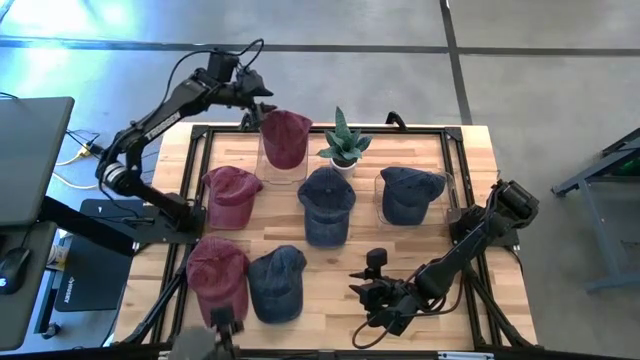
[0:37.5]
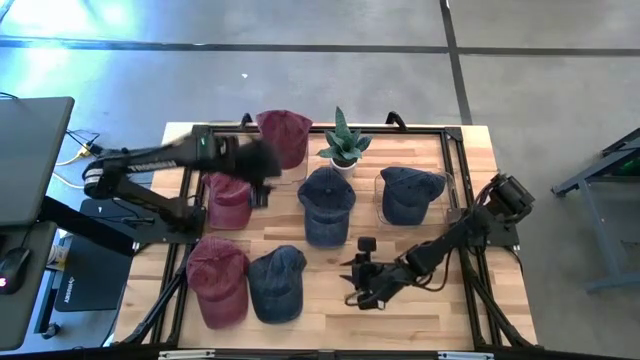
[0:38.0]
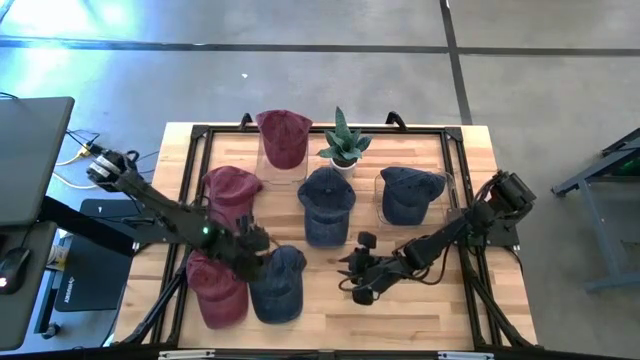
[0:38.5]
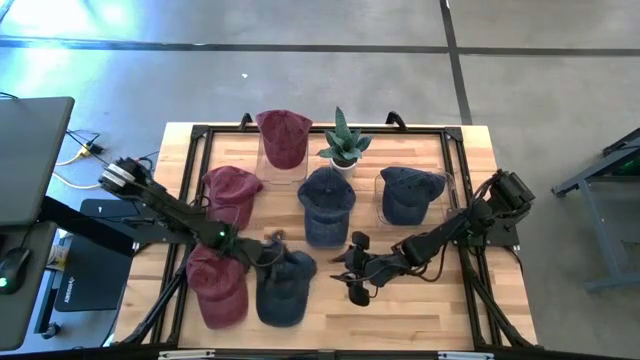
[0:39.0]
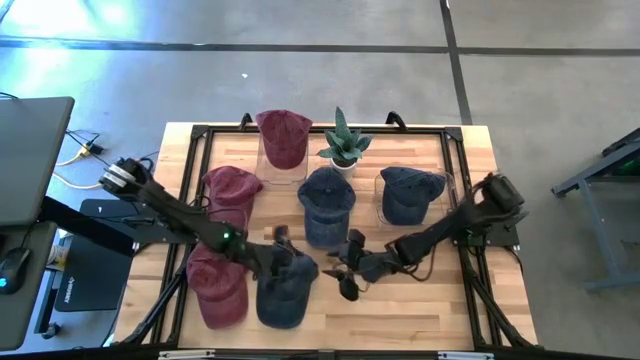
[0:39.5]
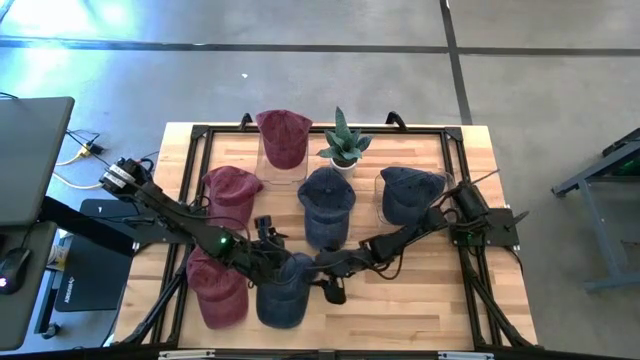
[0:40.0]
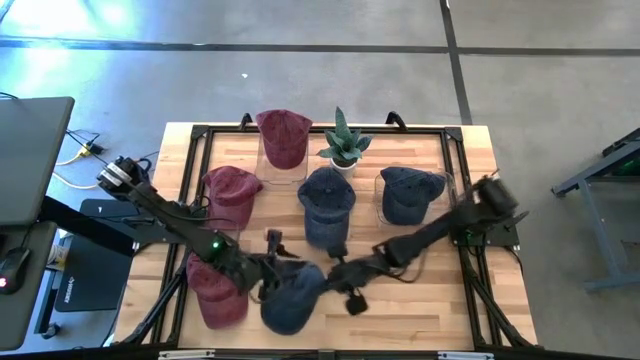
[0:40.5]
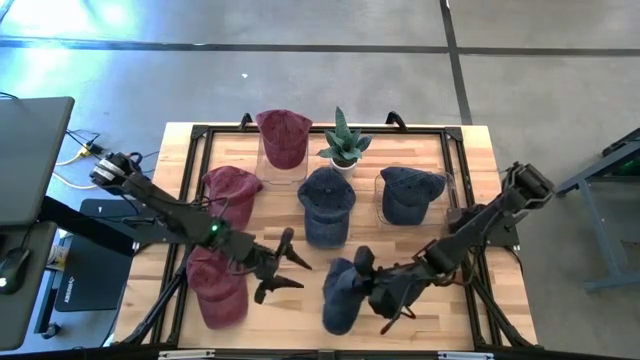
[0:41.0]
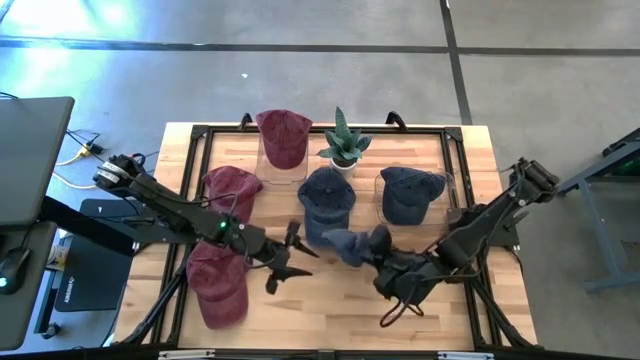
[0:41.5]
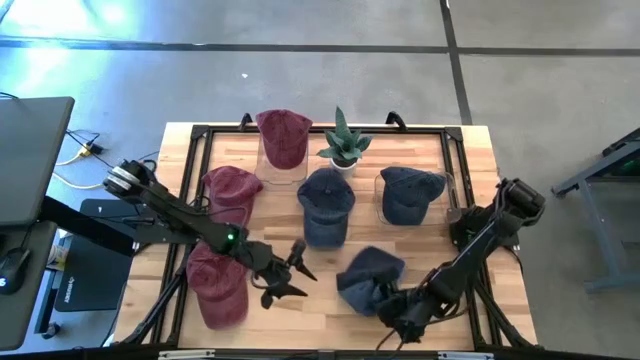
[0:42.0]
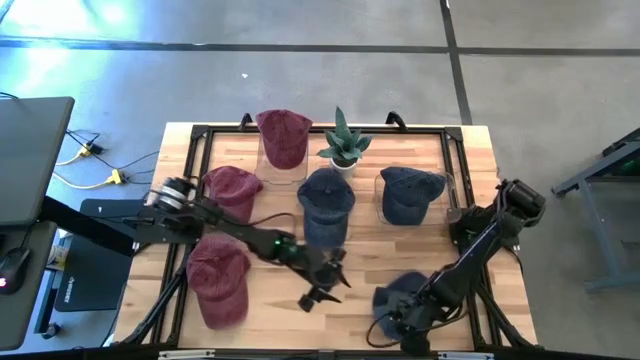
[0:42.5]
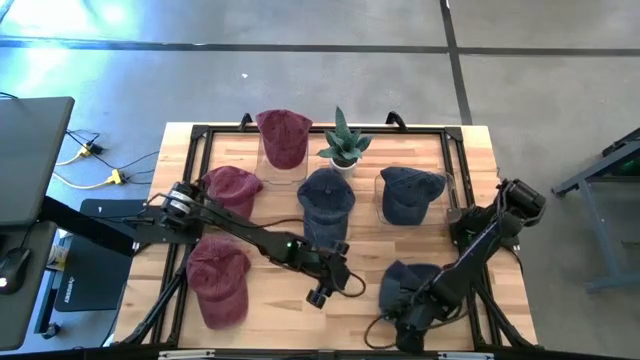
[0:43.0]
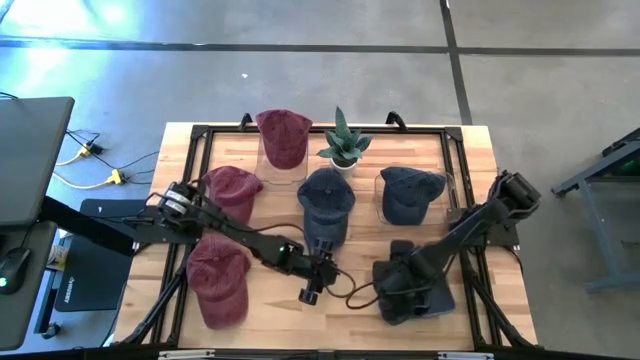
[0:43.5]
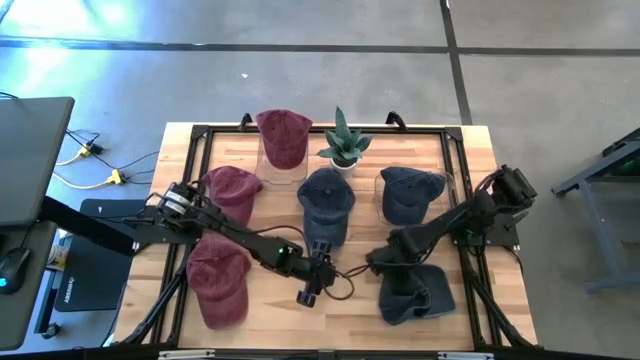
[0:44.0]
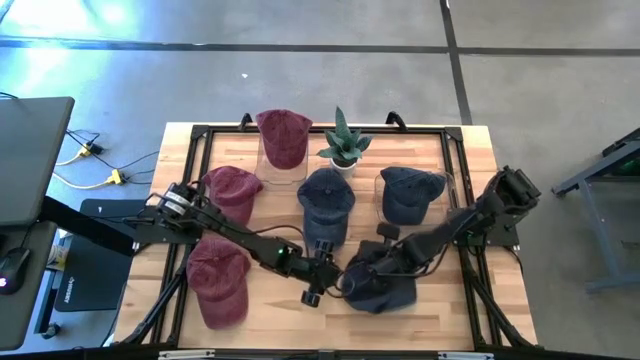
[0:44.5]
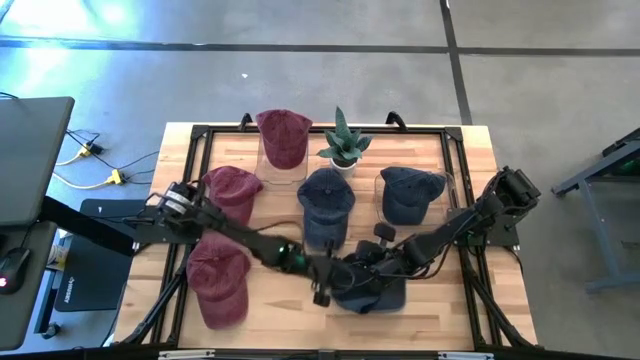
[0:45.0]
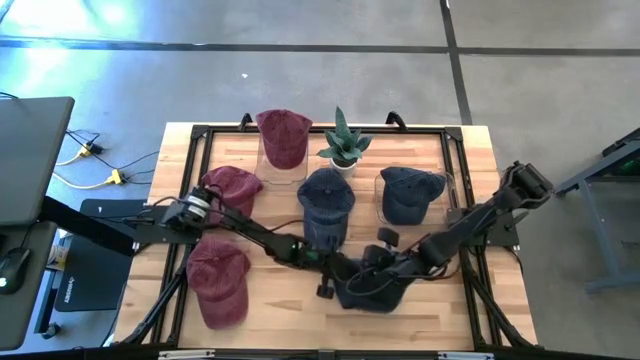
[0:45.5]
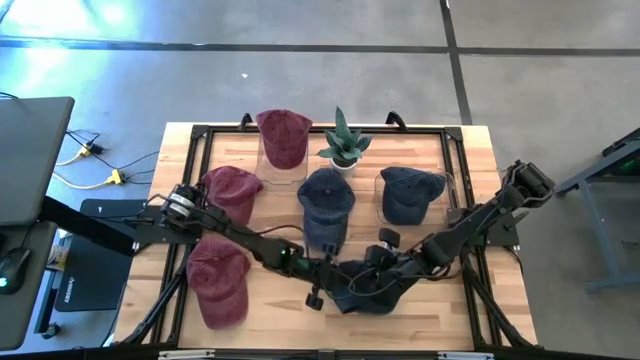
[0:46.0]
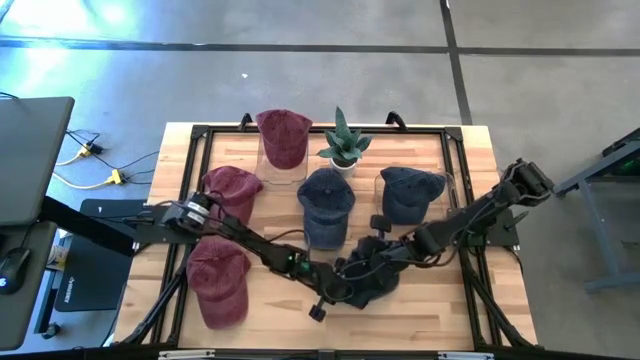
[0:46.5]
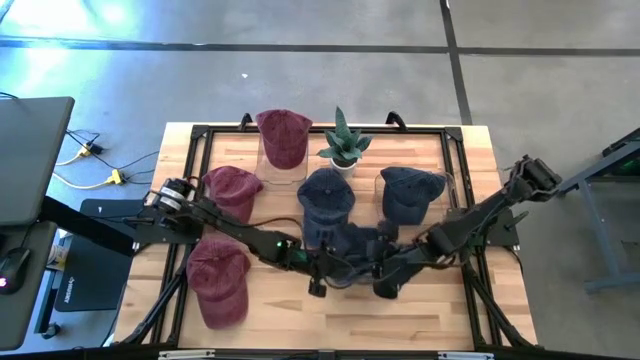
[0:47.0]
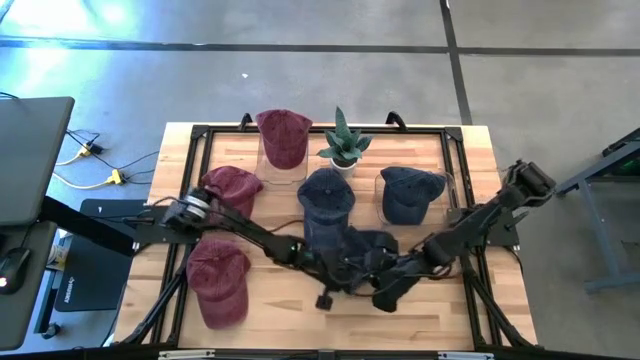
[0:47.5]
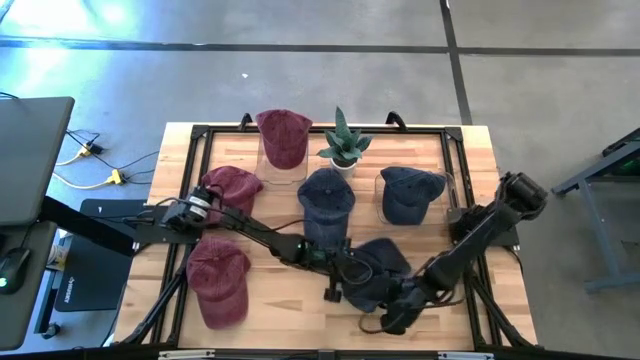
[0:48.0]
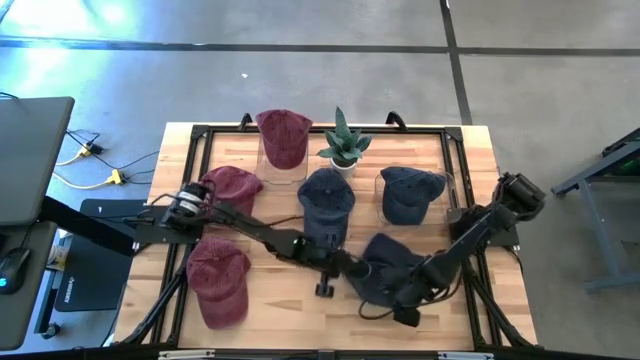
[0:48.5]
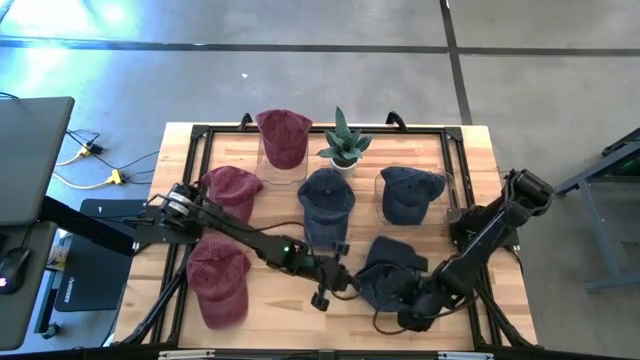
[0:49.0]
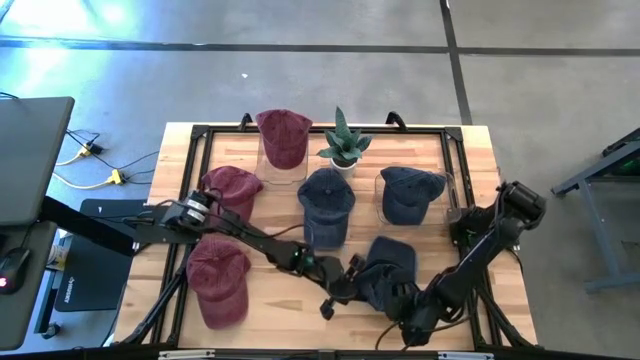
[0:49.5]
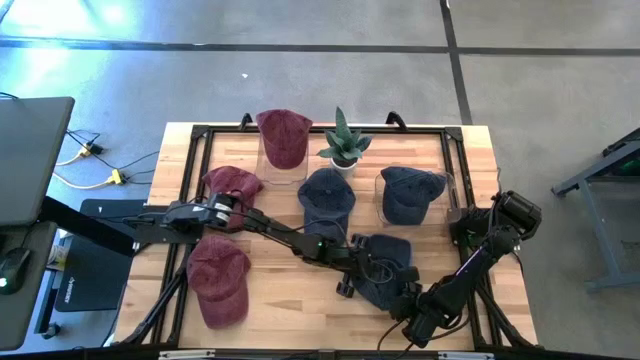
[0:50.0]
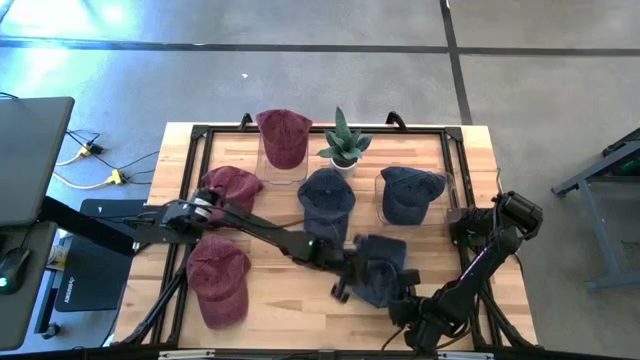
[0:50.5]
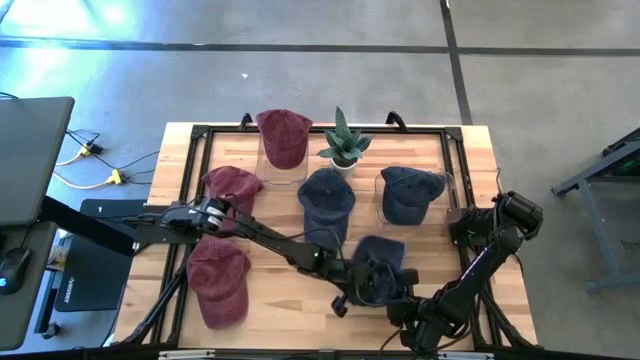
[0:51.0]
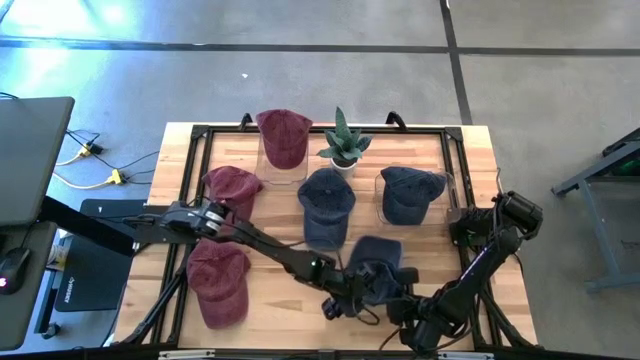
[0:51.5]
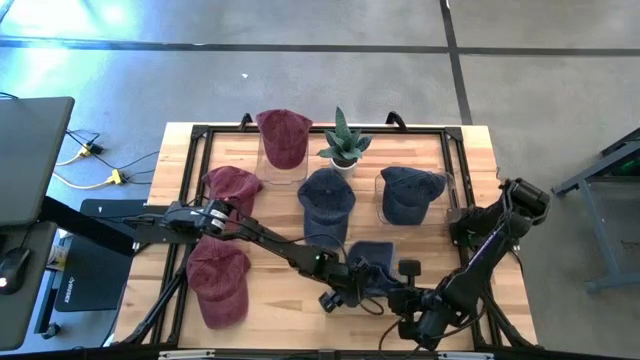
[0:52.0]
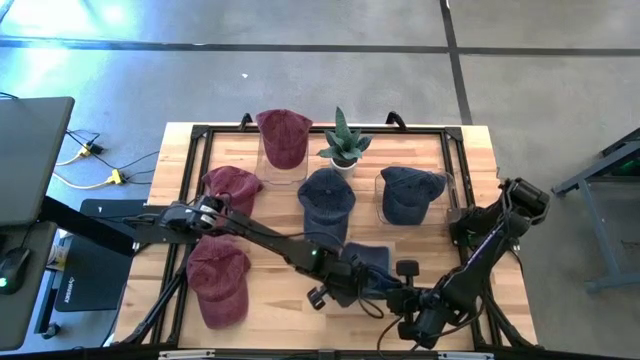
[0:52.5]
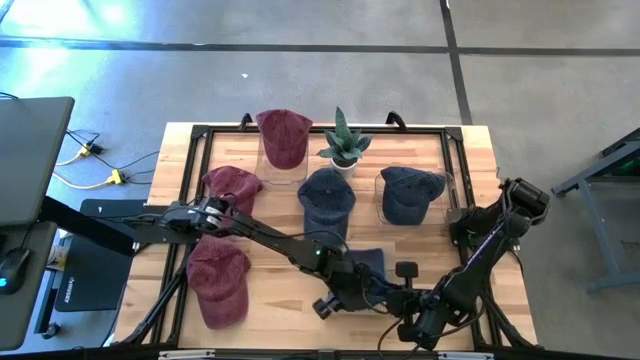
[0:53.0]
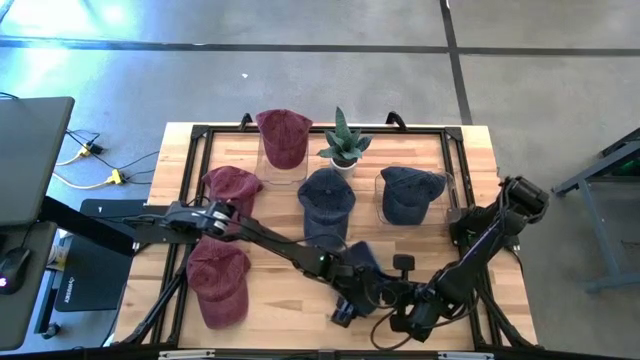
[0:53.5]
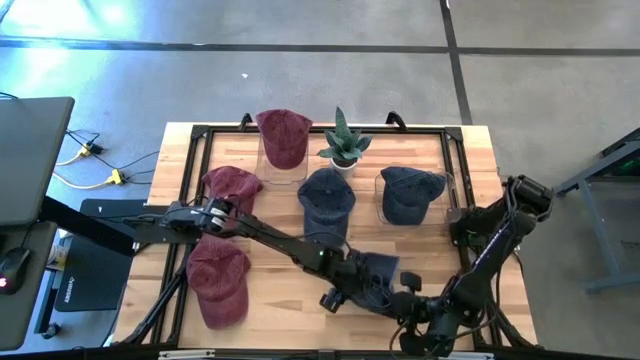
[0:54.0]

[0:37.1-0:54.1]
Task: Pick & Place hat
Put the bottom blue cap into the right transparent bin
